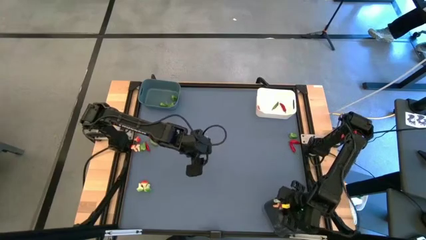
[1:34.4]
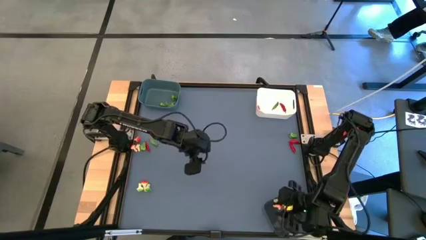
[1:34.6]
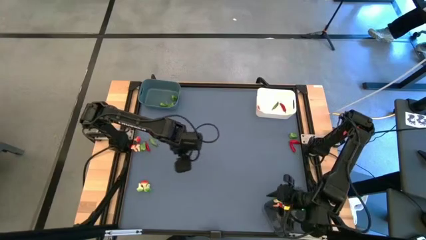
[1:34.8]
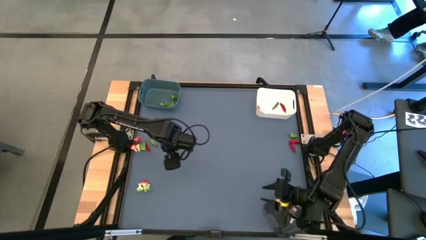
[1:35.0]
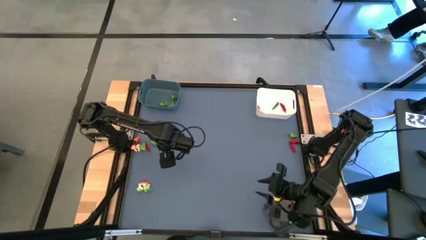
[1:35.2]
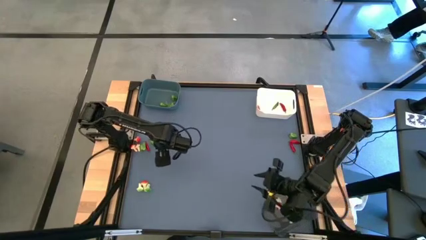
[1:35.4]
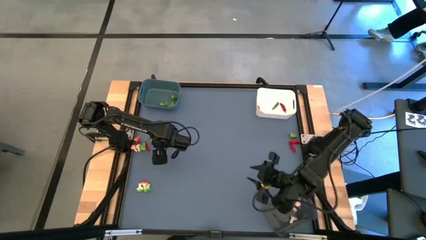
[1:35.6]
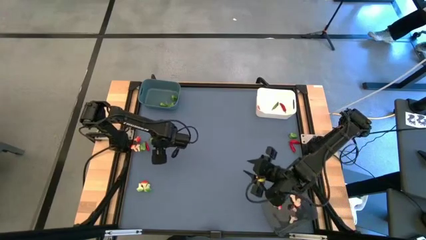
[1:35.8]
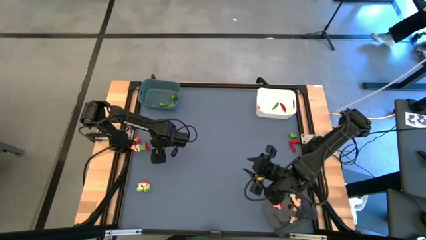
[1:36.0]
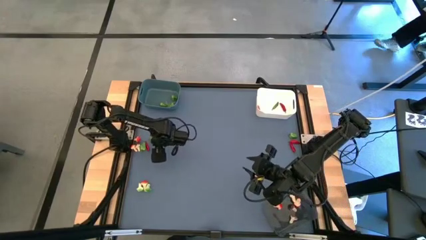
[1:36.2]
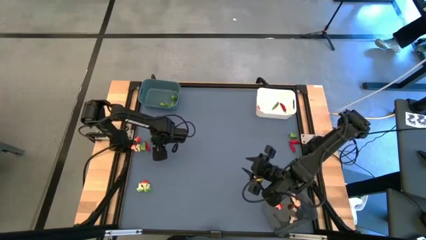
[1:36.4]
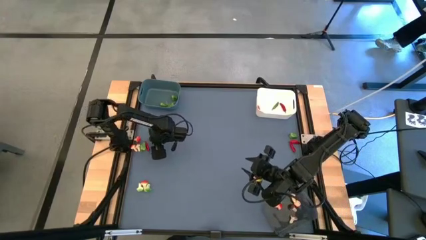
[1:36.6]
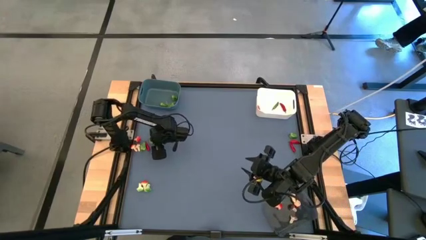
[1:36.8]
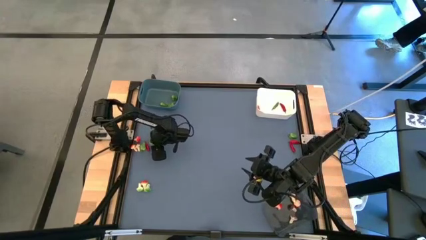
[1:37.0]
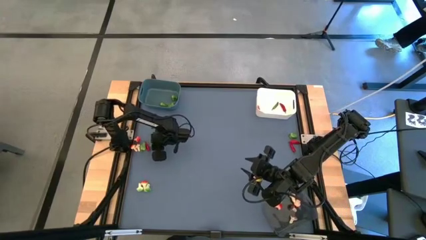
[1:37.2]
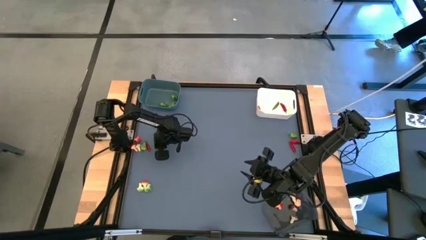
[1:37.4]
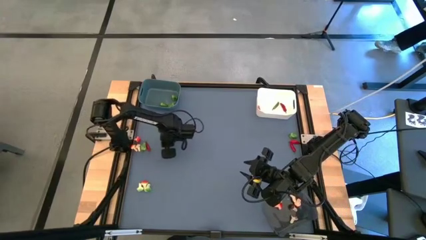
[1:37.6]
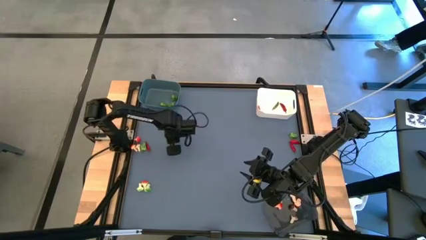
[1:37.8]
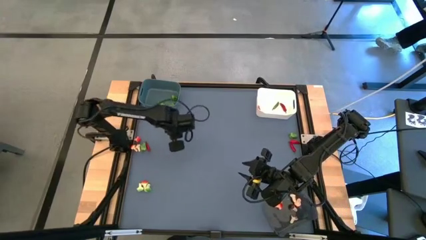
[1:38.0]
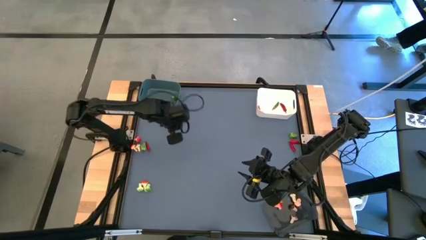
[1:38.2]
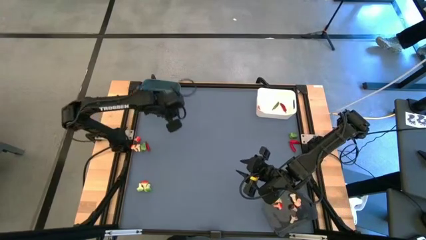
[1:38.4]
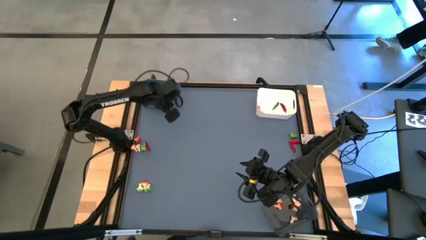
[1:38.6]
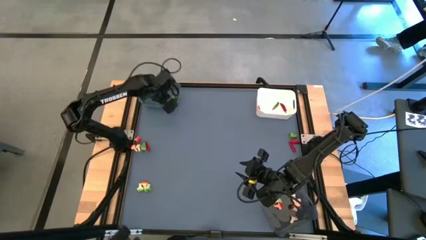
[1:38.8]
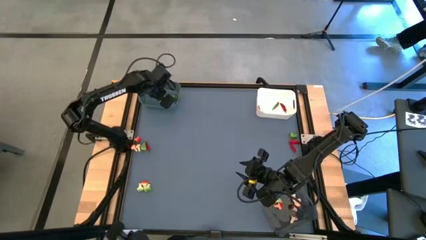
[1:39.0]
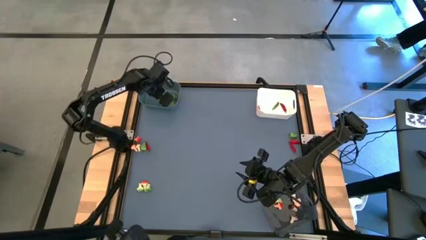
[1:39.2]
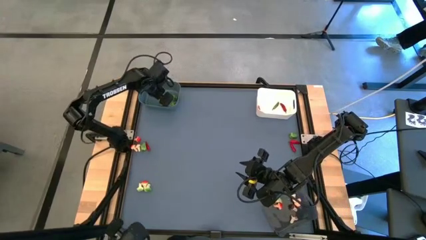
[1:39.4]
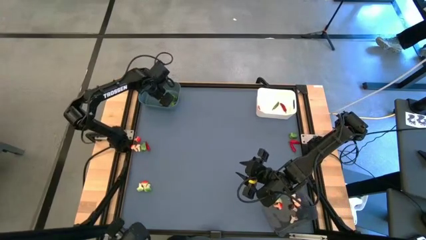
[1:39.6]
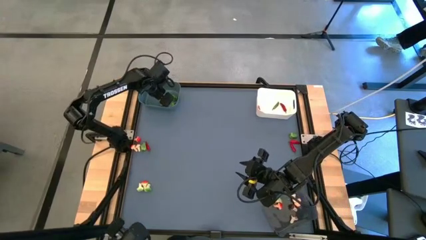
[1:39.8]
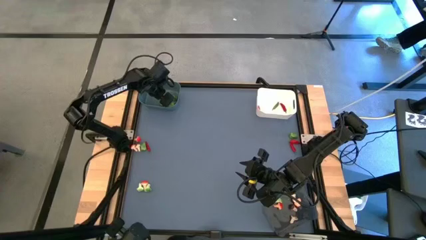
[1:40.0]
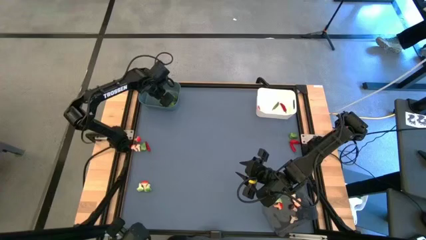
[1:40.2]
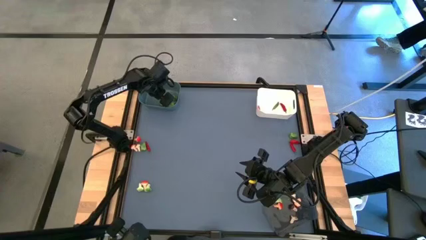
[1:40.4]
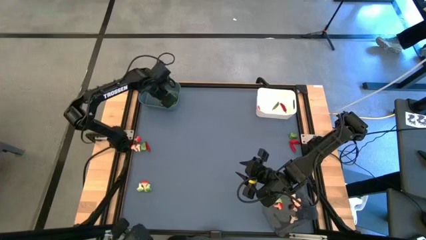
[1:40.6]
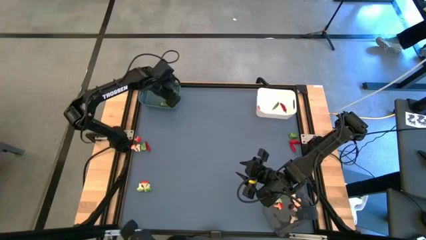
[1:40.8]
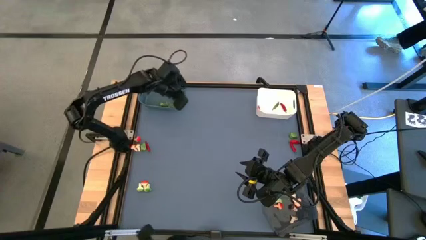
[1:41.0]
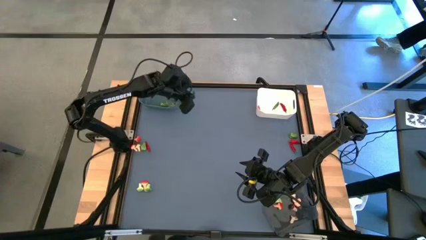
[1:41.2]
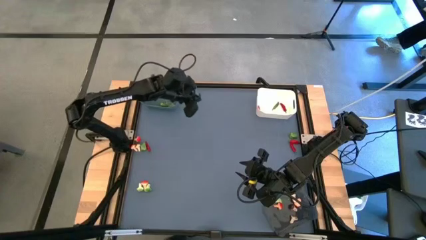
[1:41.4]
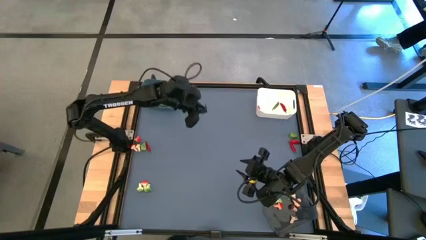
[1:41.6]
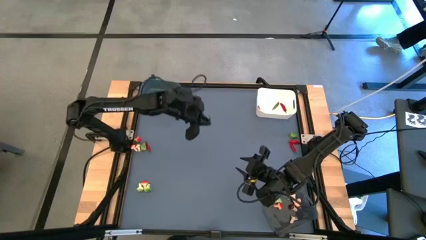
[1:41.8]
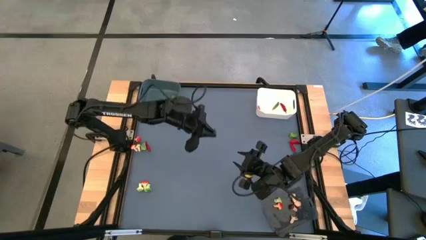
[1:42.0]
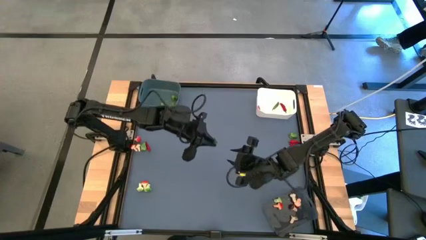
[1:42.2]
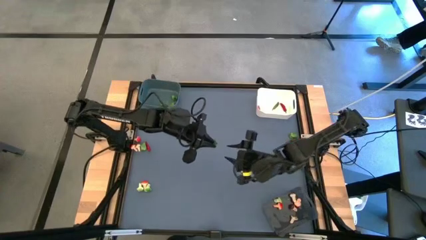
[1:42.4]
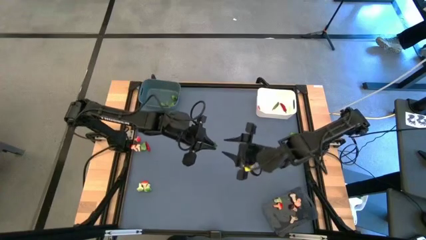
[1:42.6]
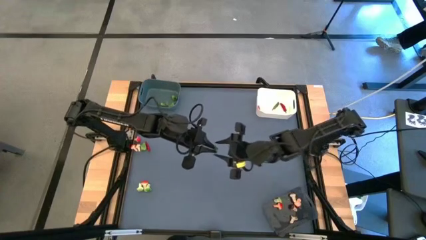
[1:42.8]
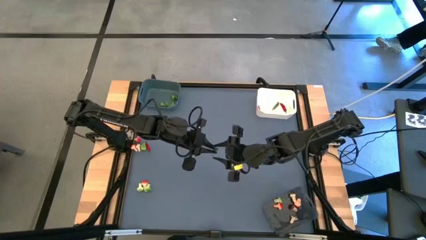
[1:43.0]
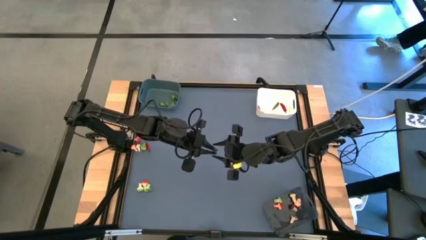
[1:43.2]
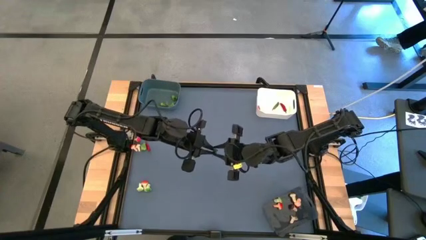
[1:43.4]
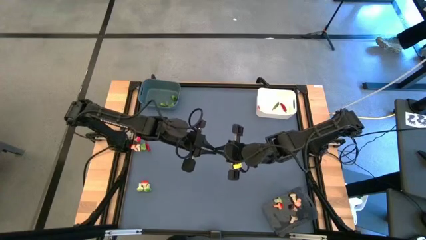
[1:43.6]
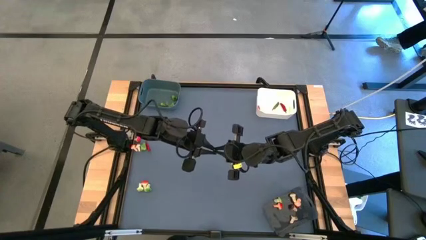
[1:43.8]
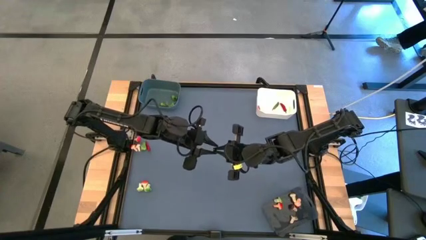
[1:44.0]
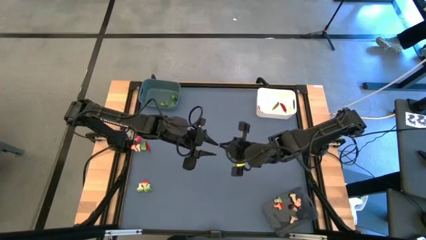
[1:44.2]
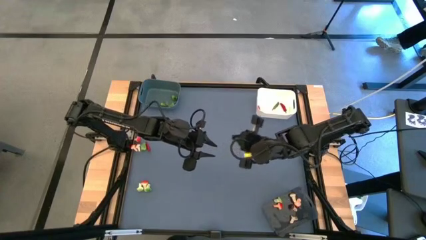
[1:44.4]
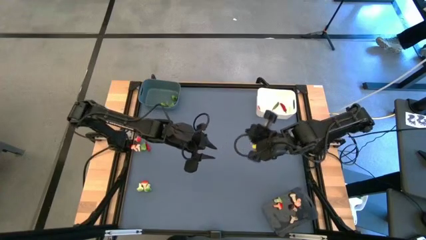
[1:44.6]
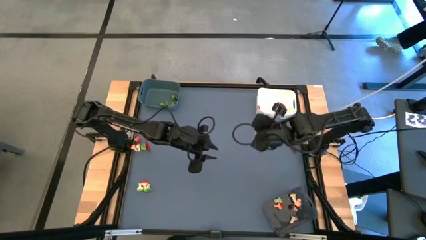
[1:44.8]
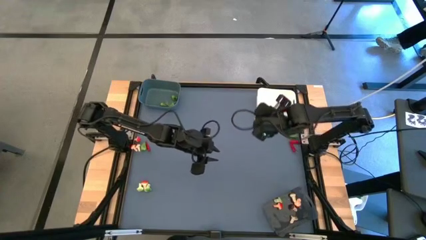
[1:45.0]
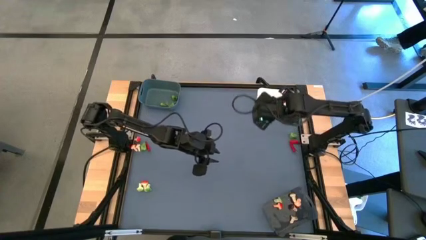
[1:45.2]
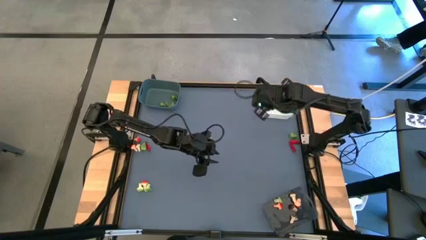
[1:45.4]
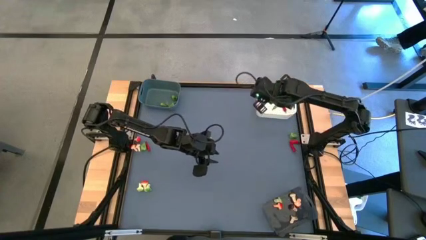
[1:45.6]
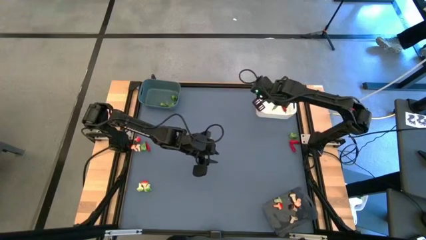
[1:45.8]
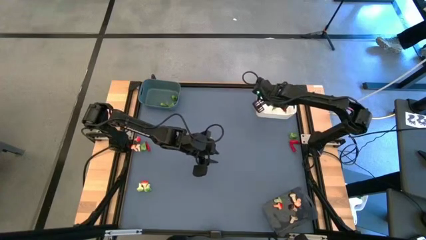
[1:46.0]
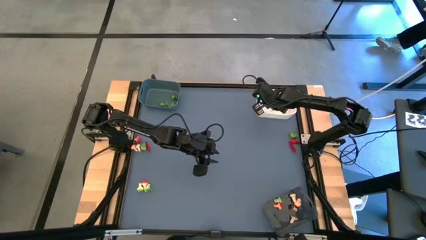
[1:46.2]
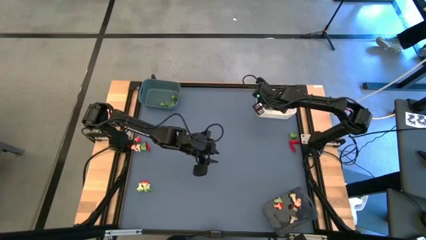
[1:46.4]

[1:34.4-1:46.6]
Task: Sort produce into baskets
Put the green chili pepper into the white bin

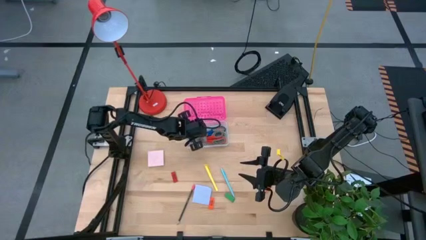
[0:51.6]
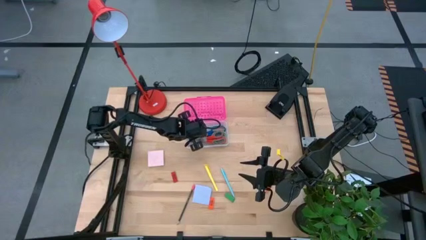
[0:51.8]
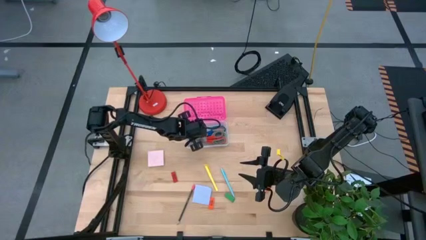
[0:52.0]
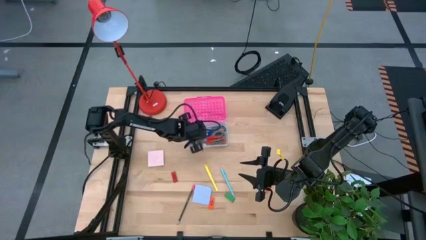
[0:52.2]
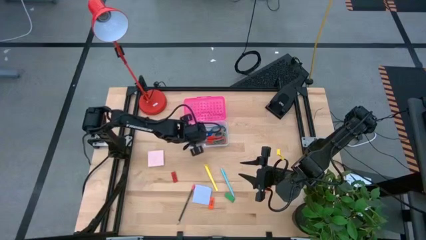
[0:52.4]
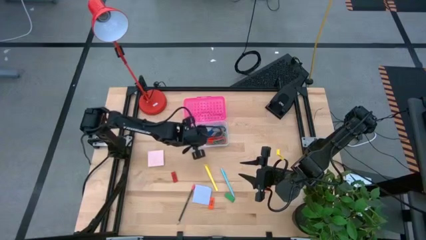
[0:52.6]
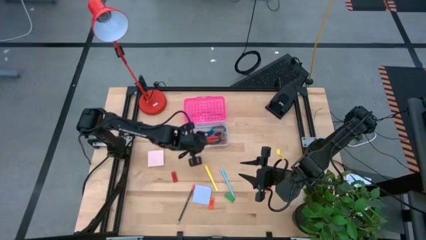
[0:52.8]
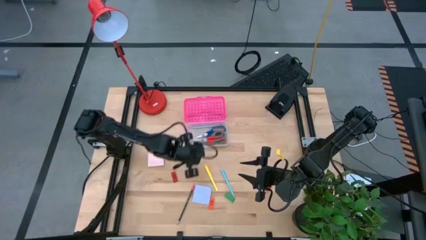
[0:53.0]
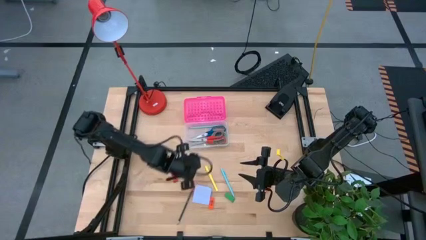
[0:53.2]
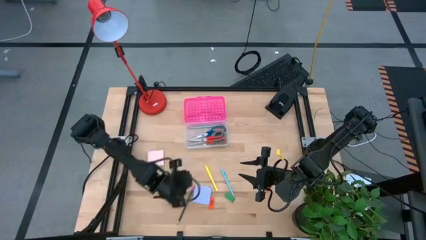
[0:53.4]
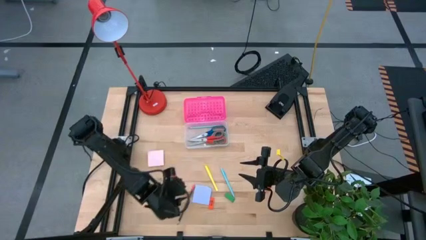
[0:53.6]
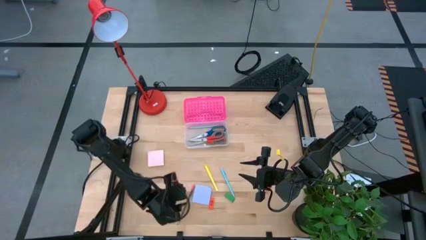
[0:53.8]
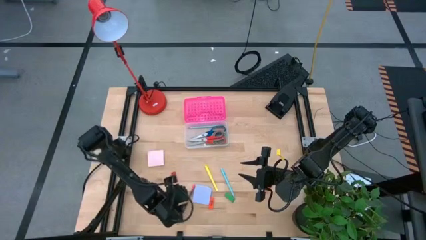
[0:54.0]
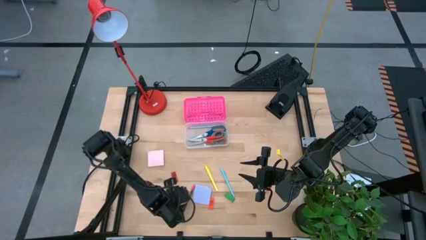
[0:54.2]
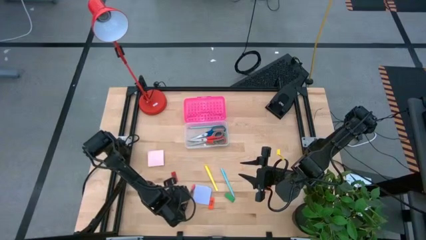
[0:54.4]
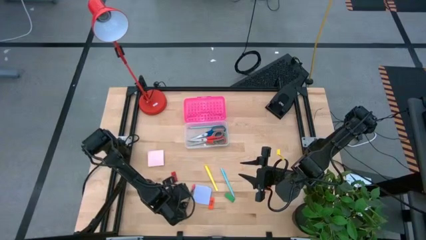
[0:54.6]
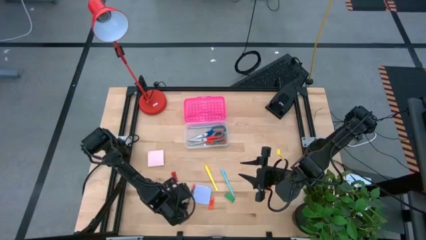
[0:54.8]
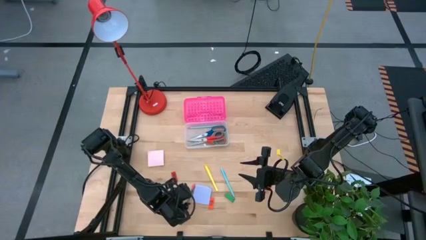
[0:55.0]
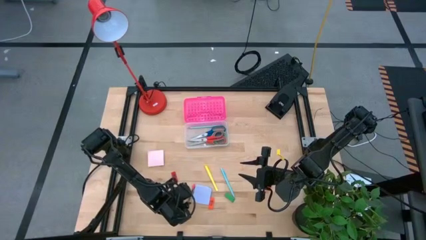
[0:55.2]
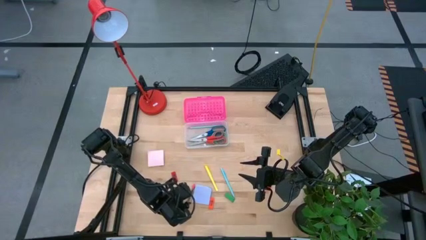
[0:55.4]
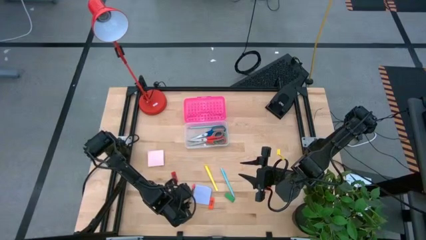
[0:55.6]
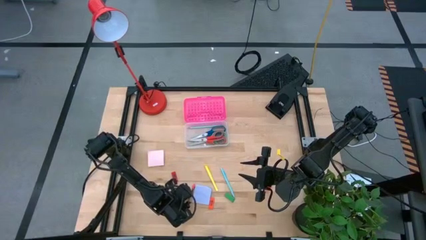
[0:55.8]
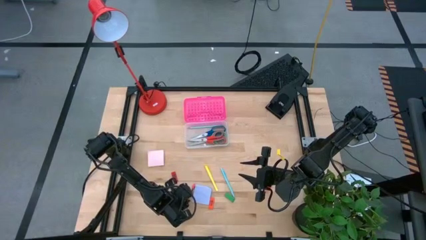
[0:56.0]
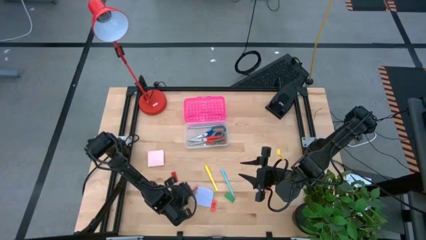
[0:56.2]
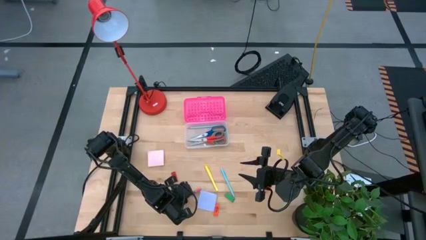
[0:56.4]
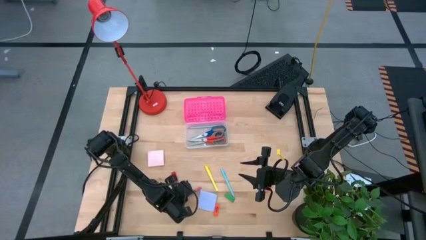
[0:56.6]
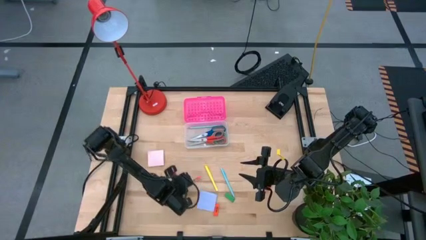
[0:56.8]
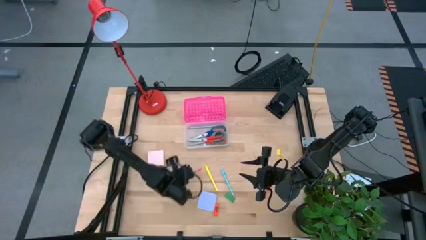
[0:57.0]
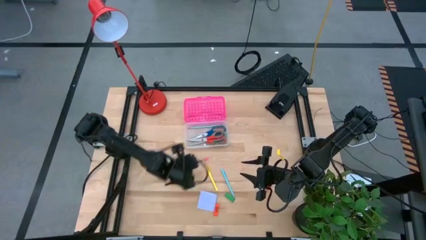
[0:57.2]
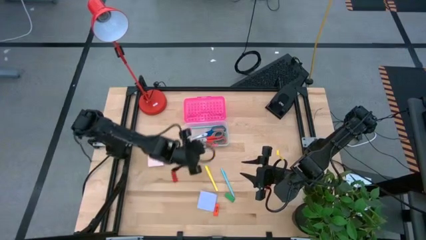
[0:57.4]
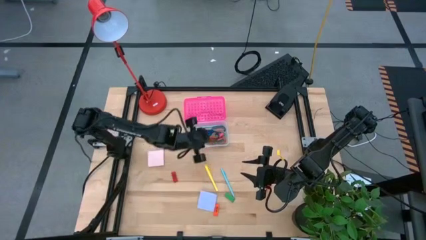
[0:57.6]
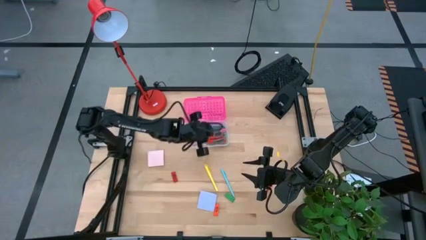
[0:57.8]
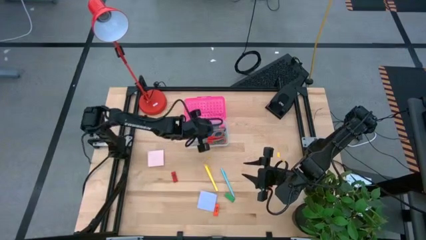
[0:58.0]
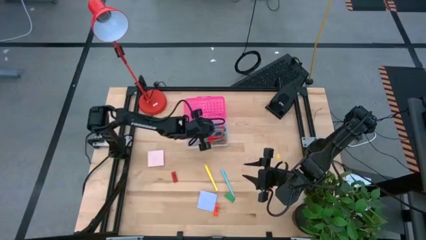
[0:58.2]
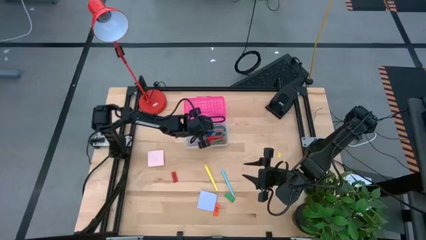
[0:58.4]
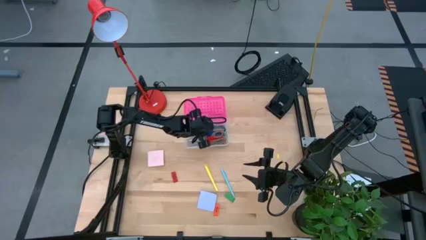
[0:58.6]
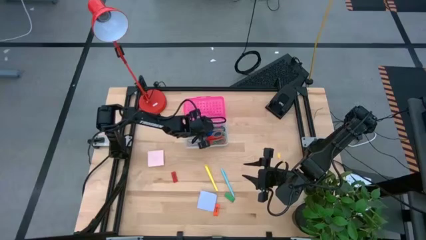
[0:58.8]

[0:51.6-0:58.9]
Task: Pack school essentials
Put the blue pencil into the pink supply box
